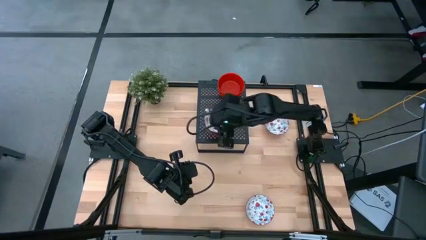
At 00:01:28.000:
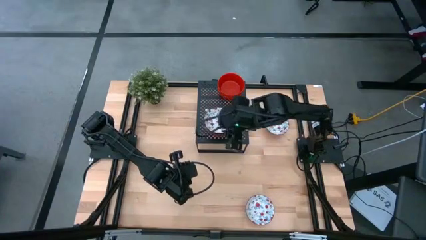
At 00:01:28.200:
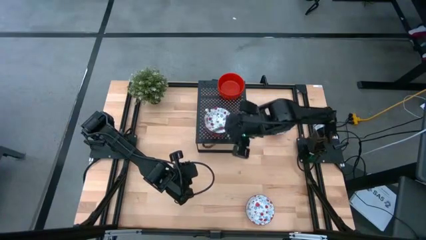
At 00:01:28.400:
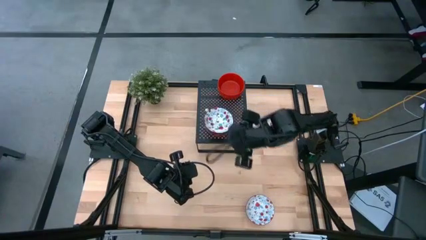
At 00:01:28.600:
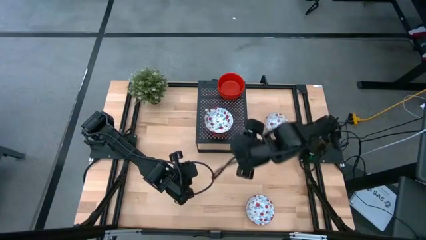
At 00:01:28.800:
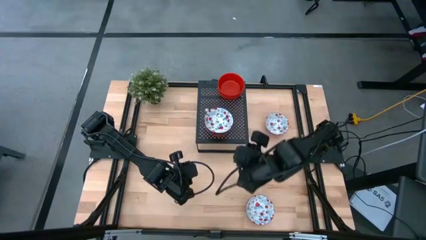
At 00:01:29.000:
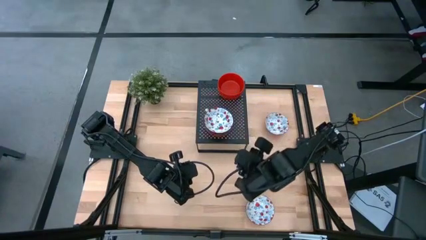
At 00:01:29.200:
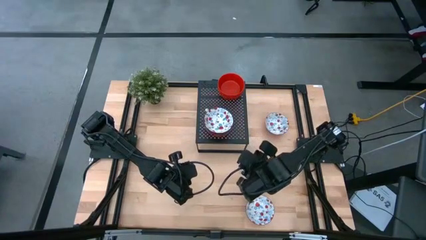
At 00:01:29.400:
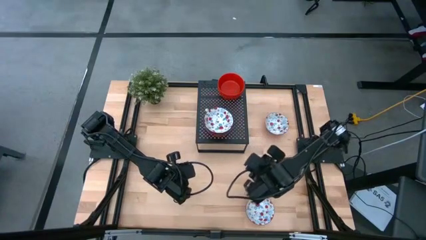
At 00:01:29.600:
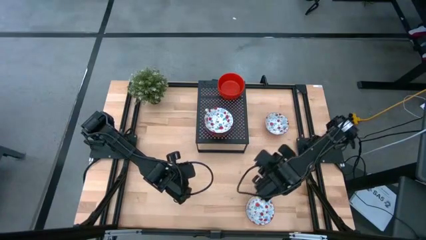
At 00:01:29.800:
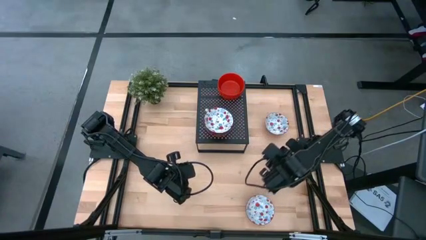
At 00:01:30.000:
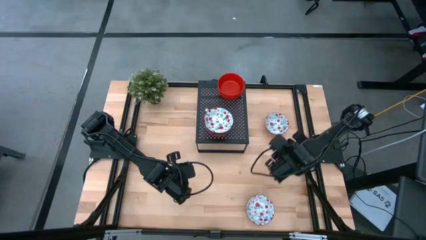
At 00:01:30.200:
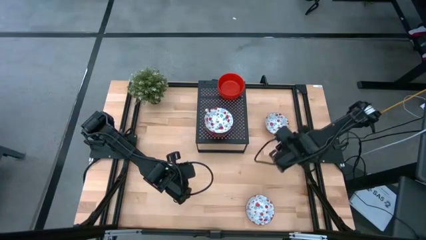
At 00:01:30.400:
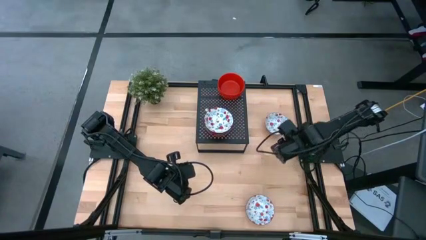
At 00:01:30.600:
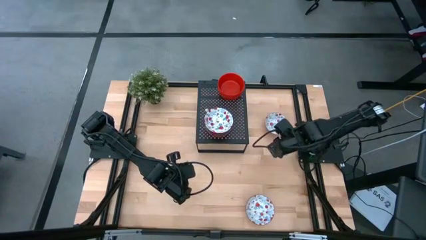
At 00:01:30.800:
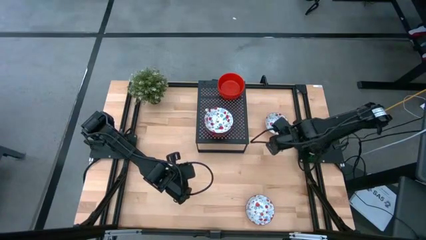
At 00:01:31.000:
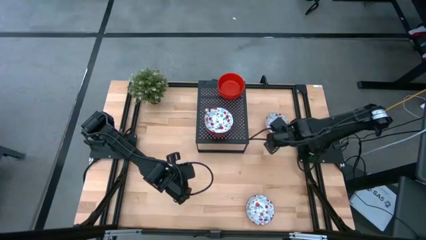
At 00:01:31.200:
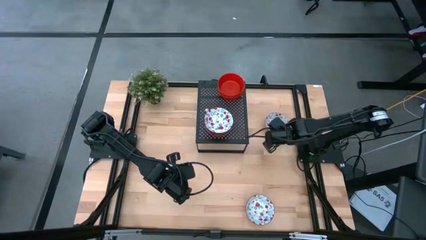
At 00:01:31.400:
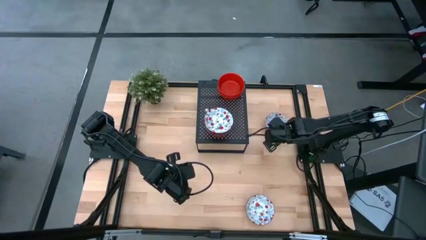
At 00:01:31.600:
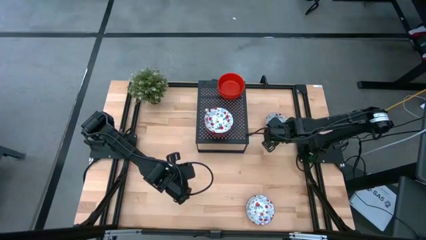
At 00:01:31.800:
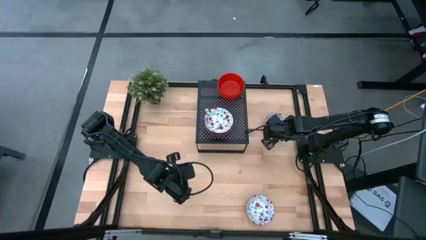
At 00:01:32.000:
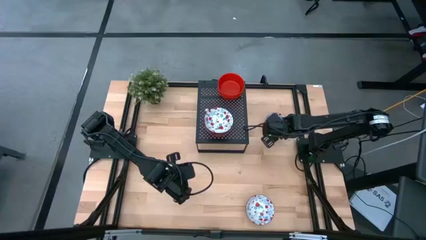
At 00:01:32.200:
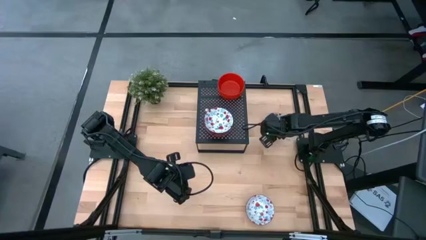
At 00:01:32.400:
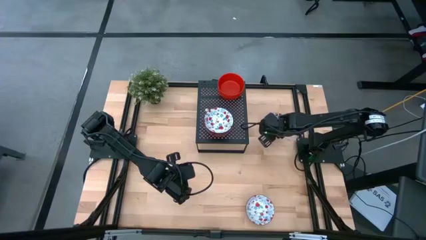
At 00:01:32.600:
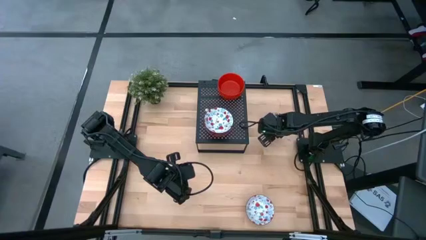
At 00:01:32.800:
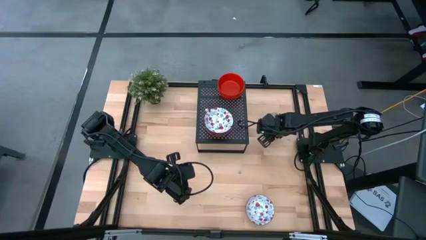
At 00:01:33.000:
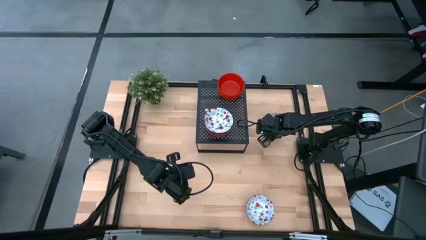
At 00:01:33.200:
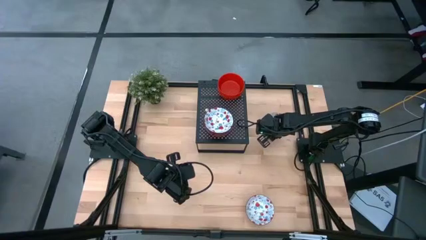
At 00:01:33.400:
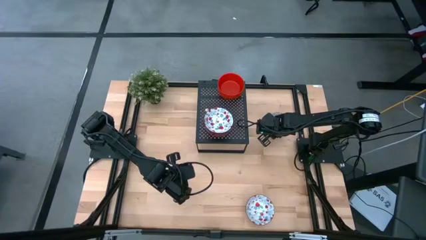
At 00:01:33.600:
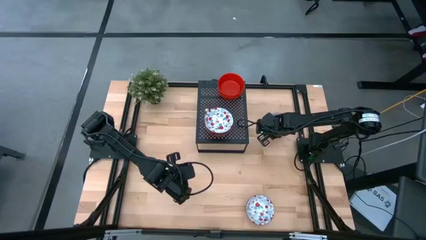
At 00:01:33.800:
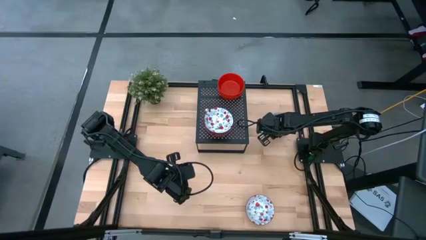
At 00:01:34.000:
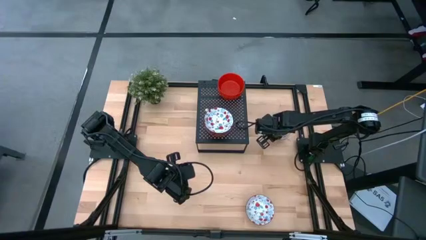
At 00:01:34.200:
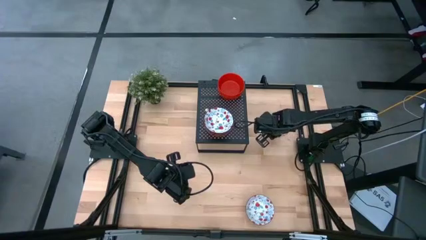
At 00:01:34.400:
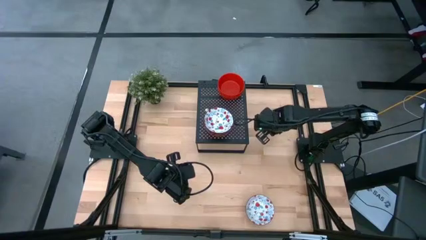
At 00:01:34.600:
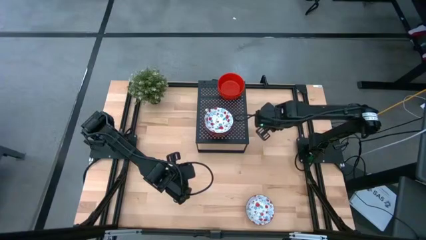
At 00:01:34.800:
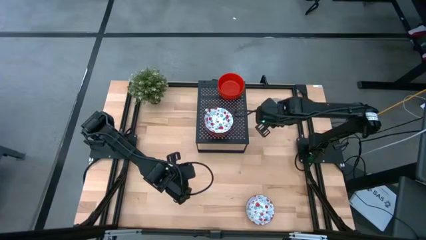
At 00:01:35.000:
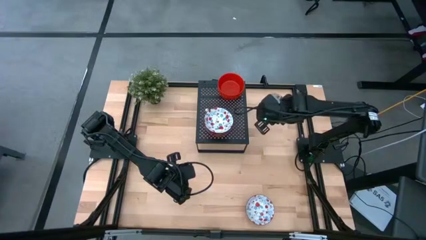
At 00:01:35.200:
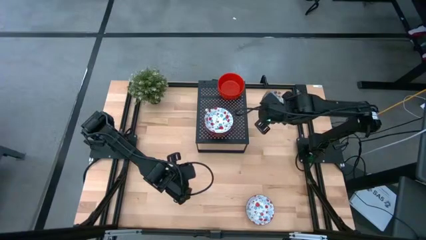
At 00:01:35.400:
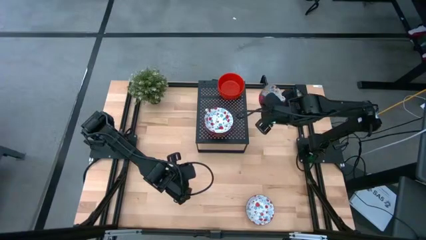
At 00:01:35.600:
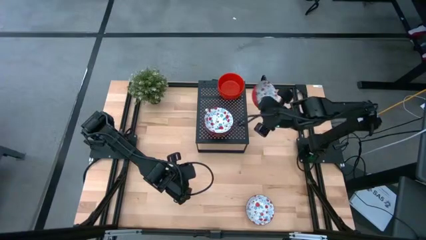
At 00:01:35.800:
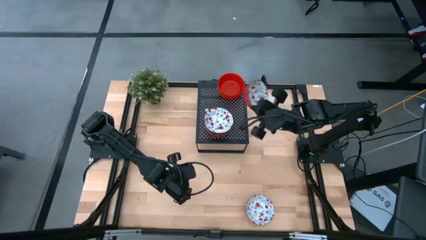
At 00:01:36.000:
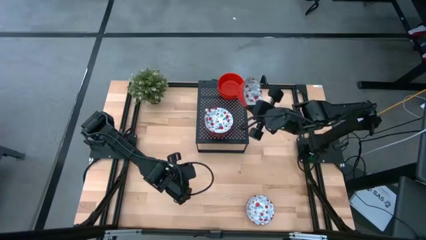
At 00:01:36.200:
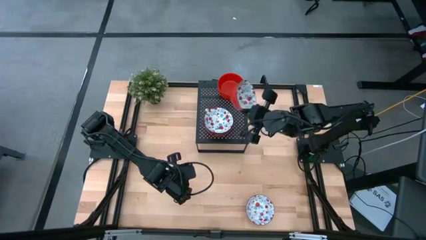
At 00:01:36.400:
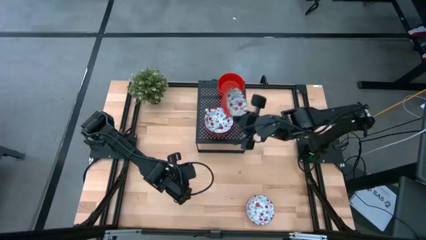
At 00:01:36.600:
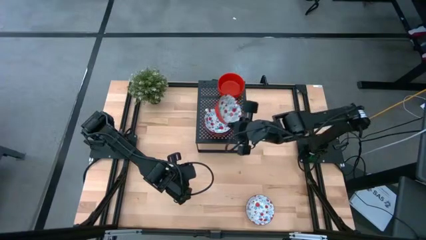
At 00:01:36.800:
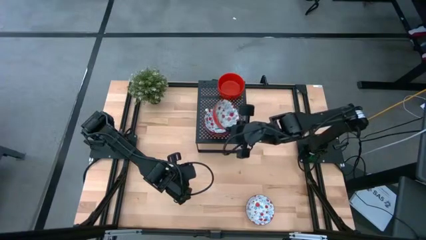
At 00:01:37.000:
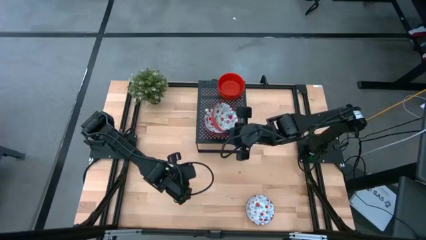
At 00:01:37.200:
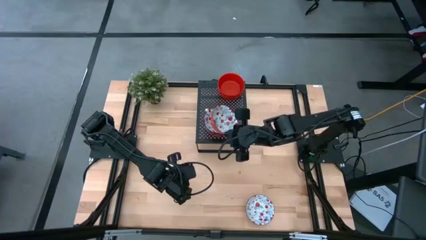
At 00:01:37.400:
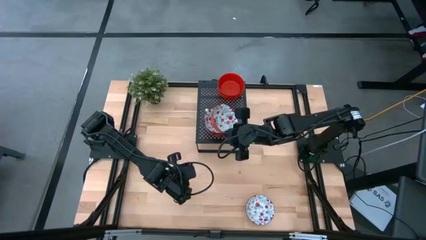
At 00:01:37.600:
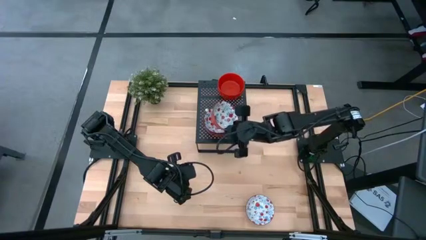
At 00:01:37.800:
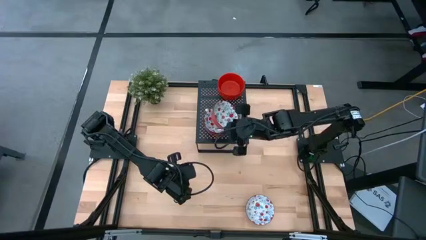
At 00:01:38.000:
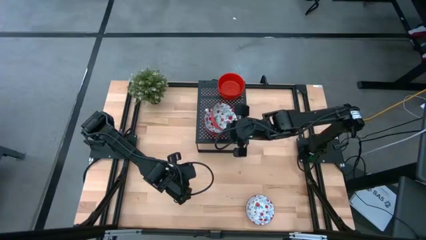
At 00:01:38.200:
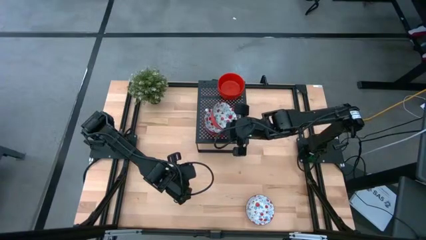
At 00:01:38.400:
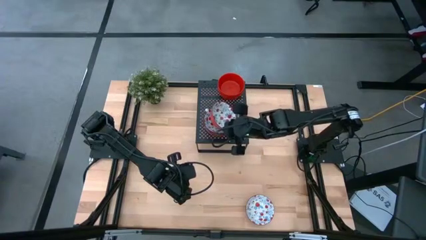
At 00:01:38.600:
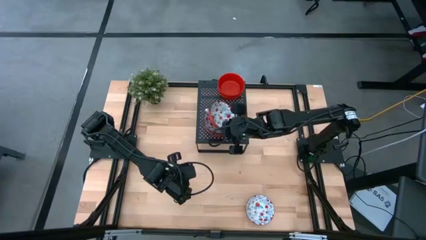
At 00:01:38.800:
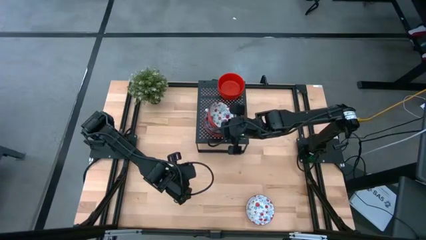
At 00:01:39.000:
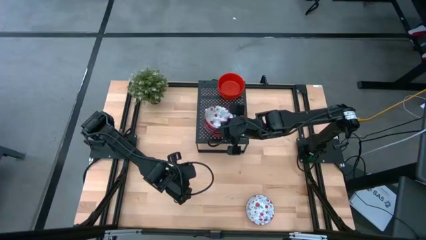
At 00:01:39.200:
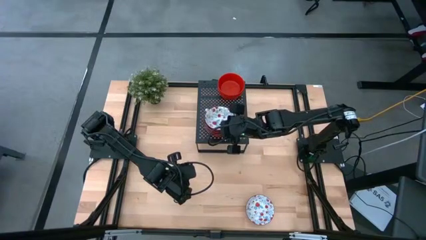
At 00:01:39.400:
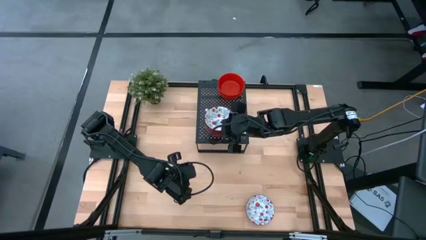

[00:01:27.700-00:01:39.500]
Task: Pick & Place Mini bowls
Stack the top white patterned bowl on top of the other white patterned bowls on the shelf
